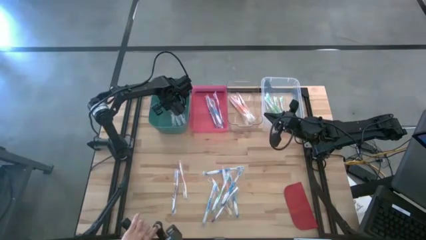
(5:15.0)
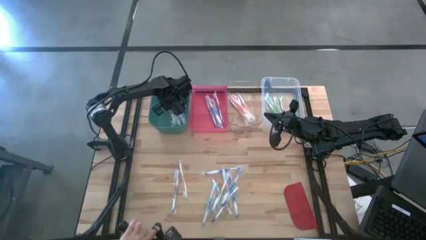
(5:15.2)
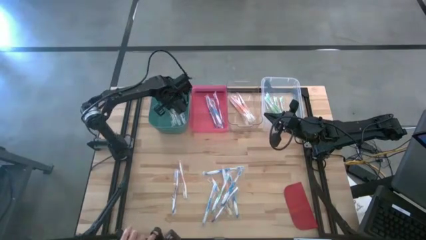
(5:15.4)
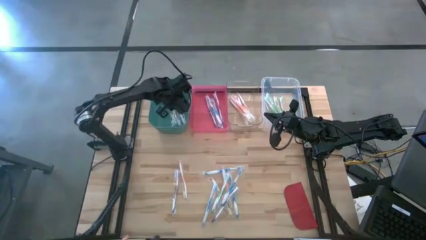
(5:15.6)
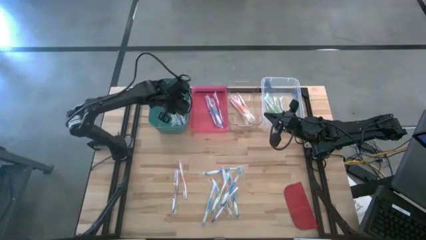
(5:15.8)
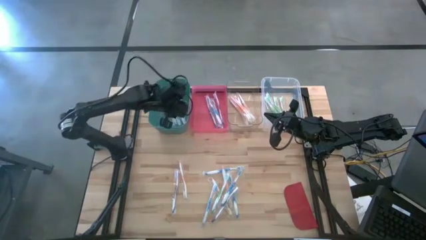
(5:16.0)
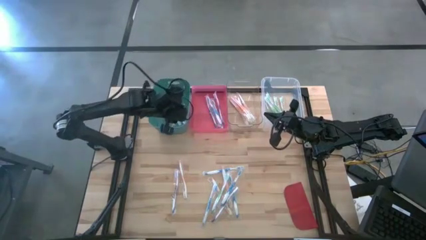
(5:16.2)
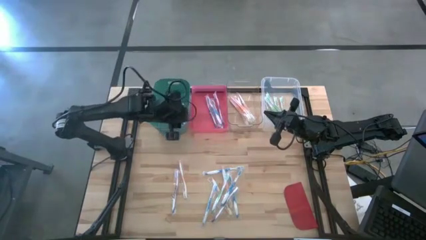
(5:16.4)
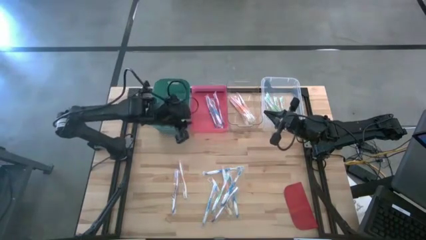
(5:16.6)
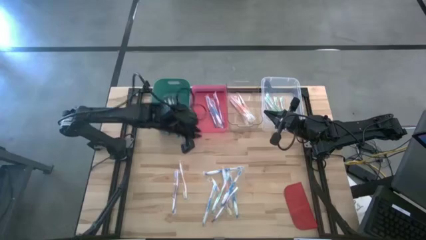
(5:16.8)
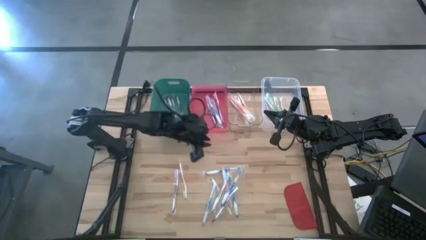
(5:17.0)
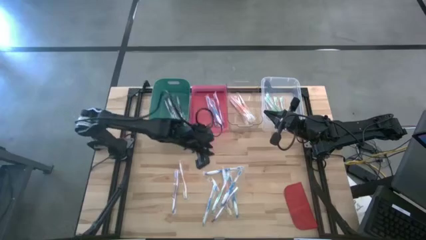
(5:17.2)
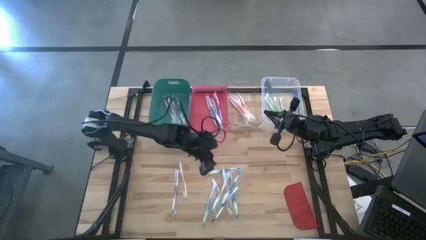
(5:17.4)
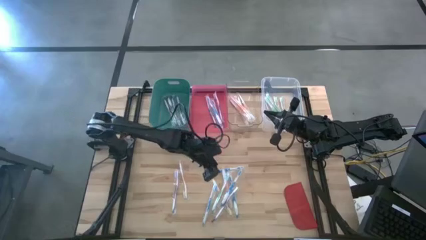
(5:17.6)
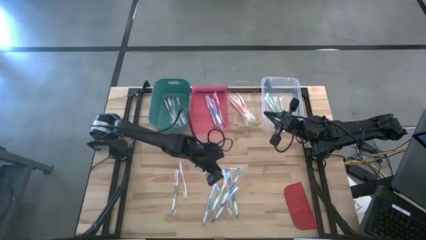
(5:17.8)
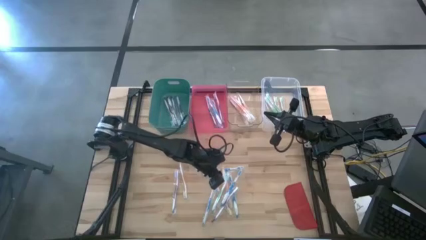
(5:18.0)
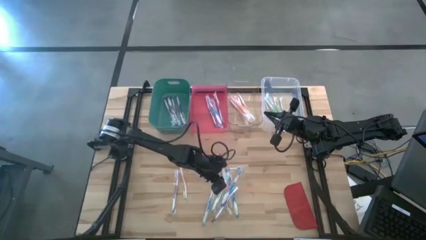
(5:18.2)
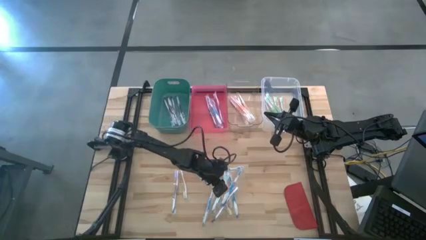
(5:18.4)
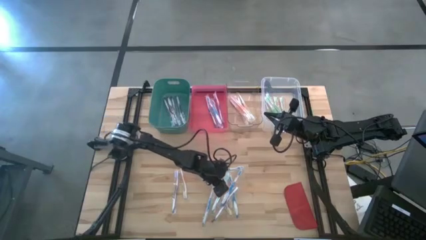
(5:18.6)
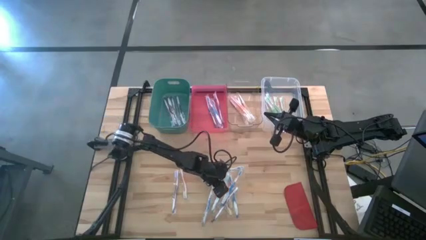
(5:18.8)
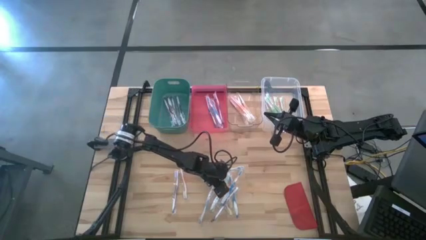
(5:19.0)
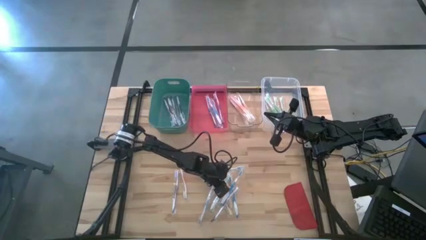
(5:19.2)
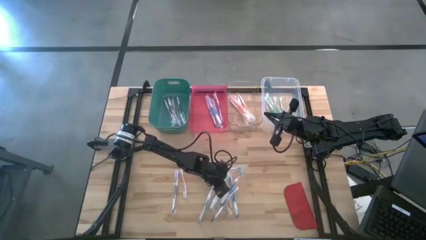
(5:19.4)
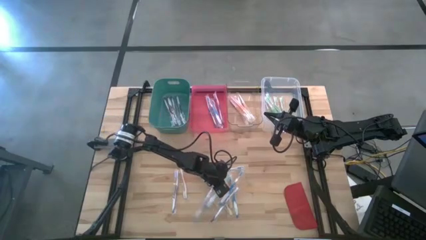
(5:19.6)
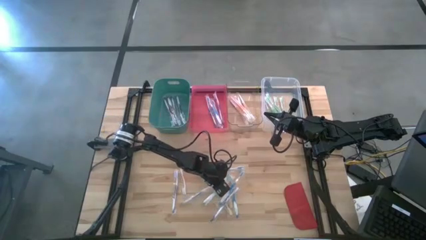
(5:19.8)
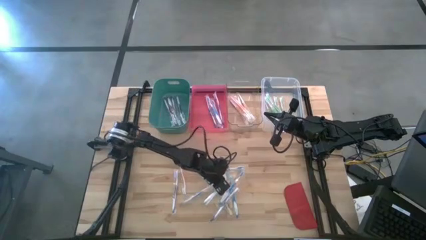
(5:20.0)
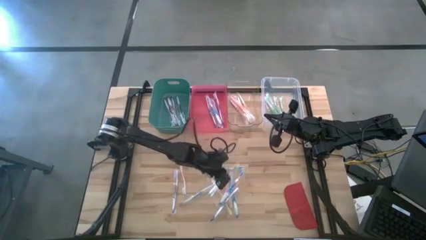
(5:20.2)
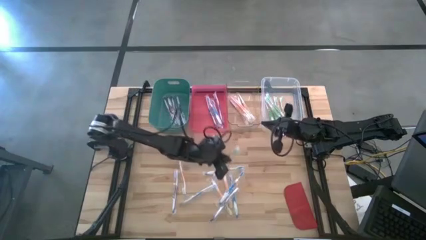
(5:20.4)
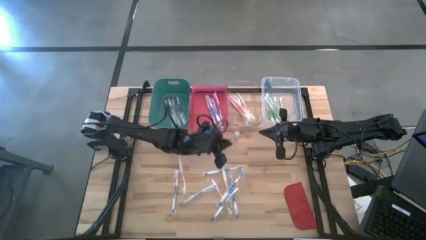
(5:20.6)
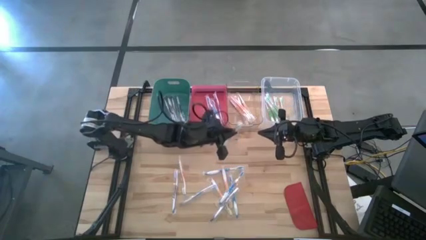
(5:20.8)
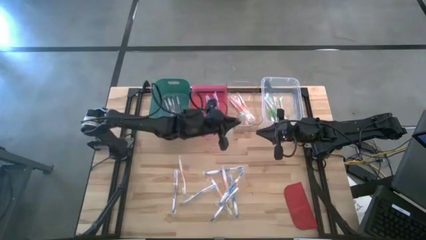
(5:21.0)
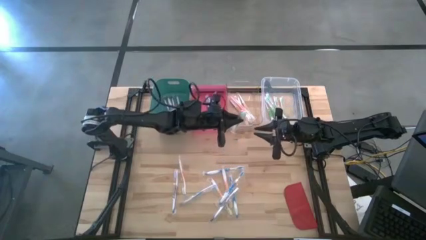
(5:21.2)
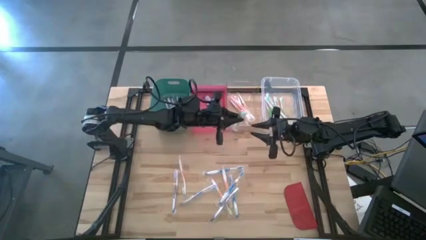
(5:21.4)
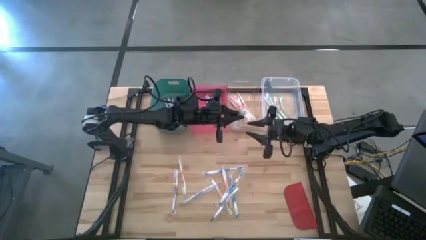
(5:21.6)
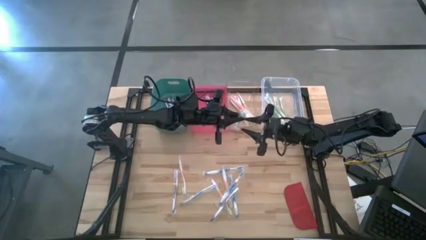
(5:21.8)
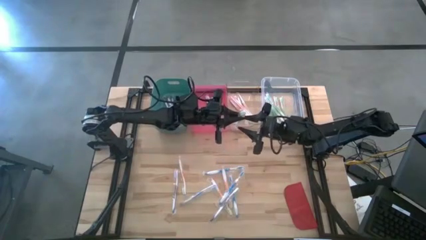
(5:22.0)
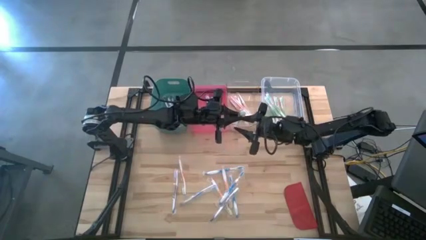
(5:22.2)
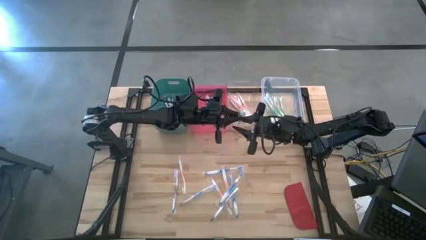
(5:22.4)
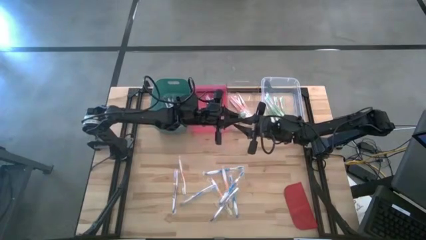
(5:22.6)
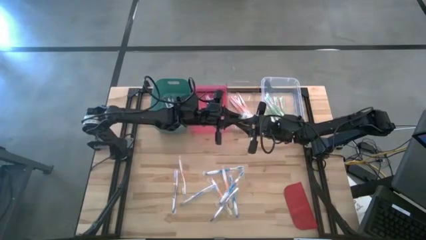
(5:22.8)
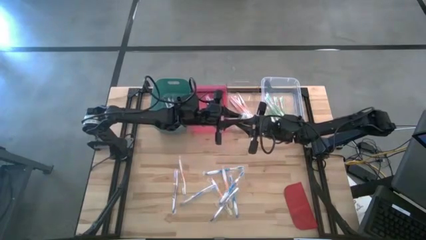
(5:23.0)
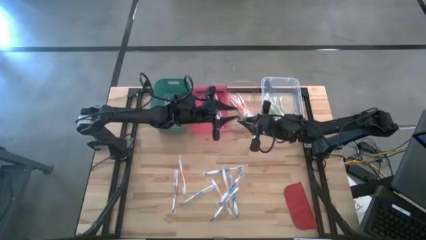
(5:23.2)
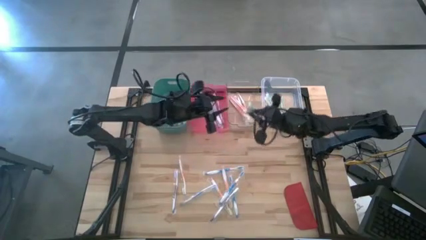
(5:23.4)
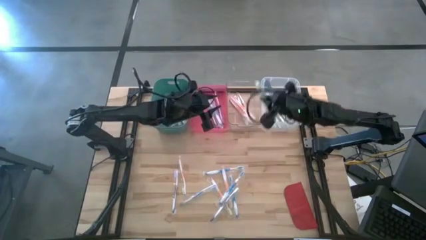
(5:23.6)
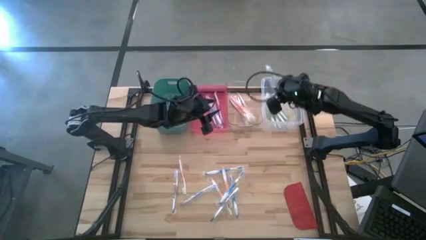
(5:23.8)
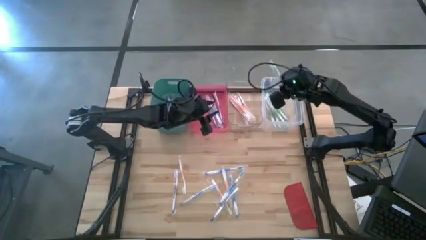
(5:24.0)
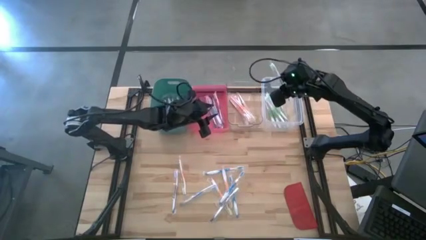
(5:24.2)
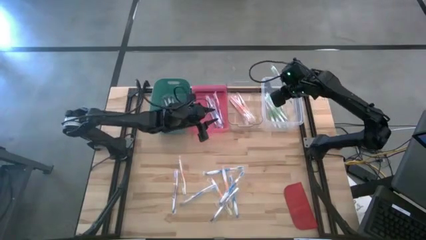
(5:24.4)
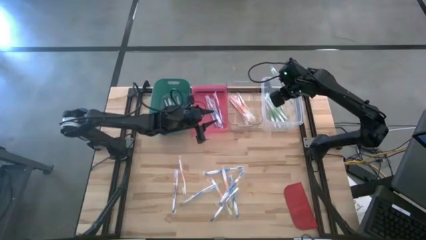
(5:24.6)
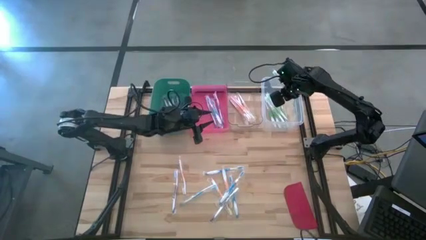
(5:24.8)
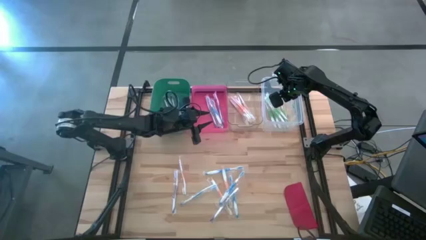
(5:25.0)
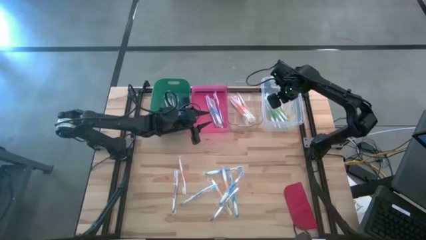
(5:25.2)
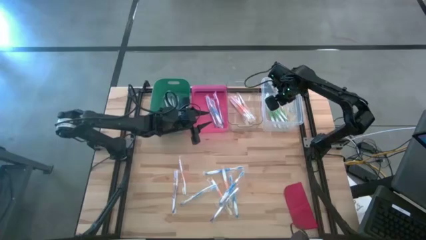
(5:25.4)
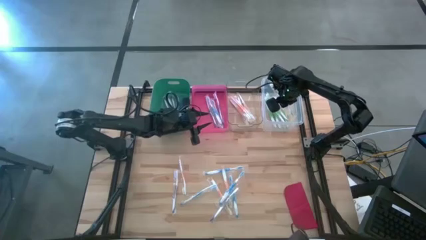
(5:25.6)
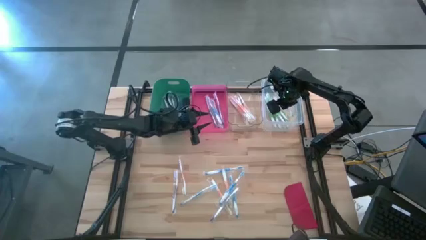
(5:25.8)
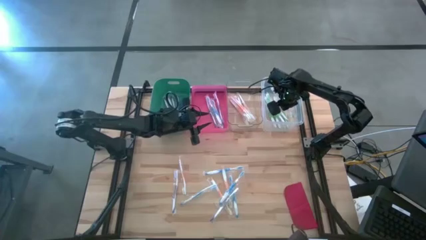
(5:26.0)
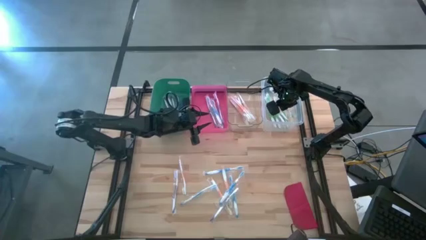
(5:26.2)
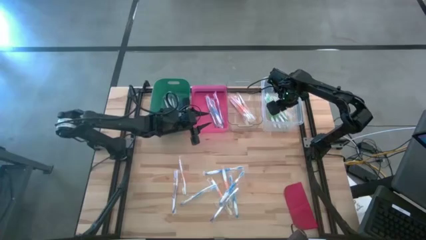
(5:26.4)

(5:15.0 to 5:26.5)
Task: Pick & Place Toothbrushes
Put the green toothbrush into the white bin

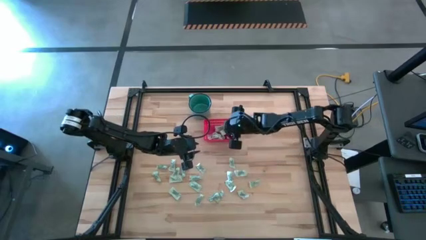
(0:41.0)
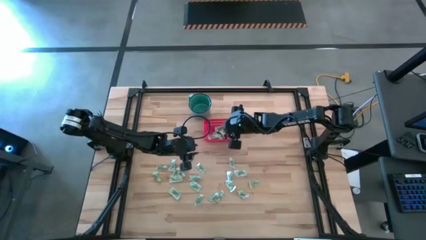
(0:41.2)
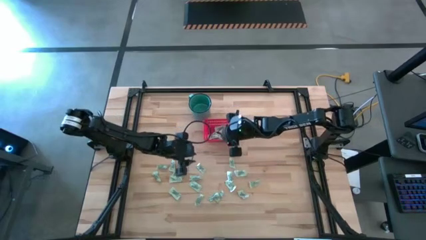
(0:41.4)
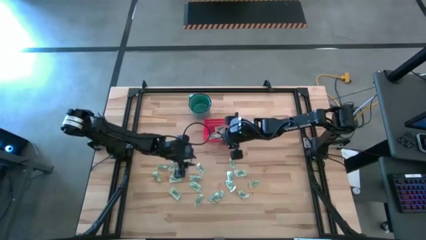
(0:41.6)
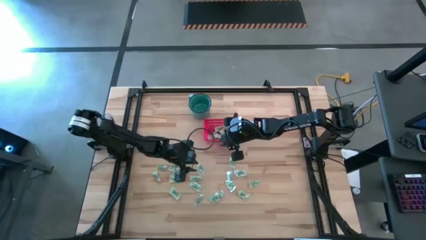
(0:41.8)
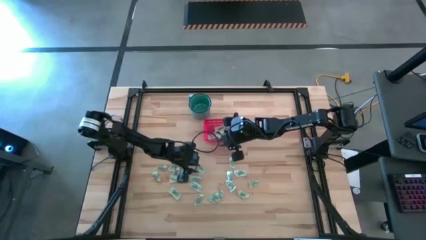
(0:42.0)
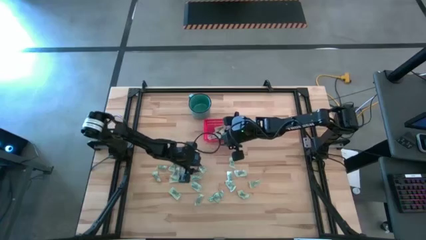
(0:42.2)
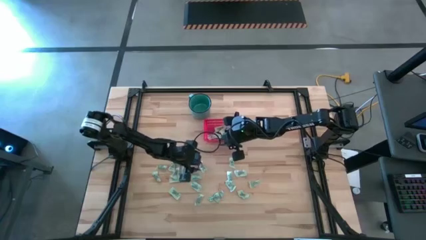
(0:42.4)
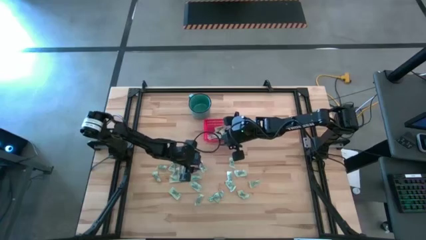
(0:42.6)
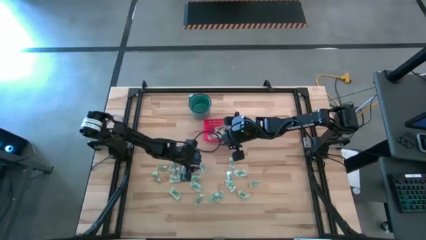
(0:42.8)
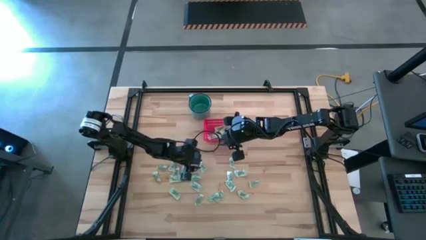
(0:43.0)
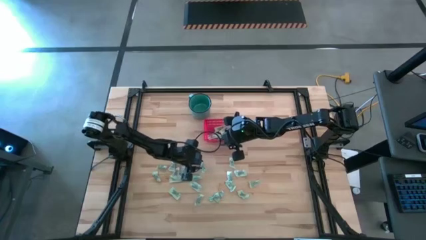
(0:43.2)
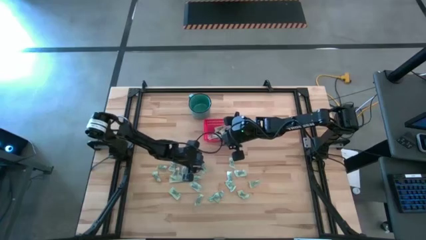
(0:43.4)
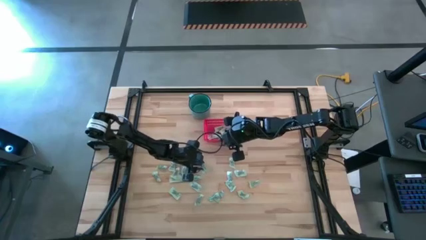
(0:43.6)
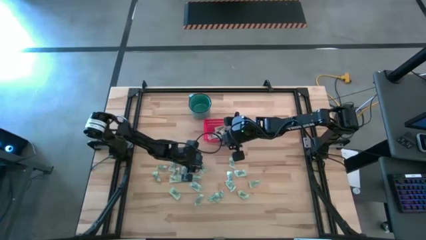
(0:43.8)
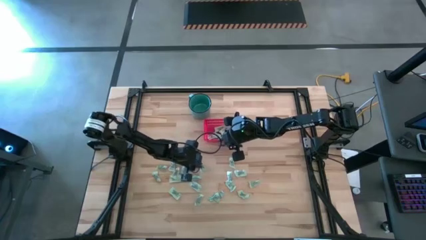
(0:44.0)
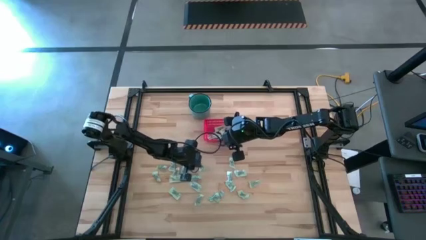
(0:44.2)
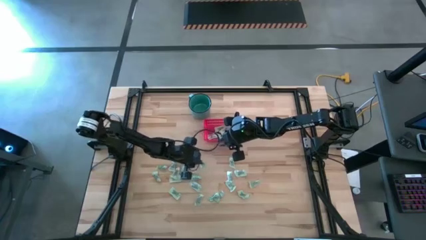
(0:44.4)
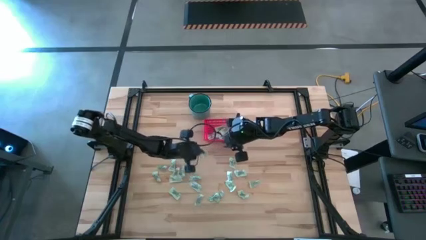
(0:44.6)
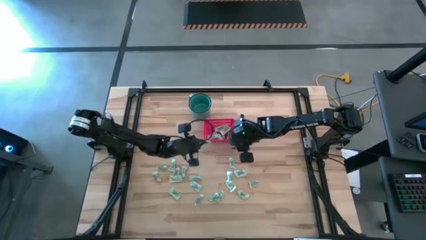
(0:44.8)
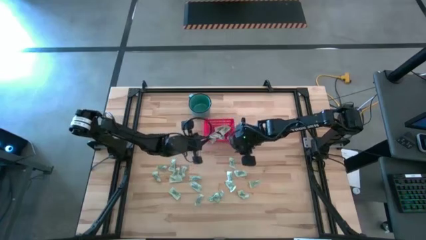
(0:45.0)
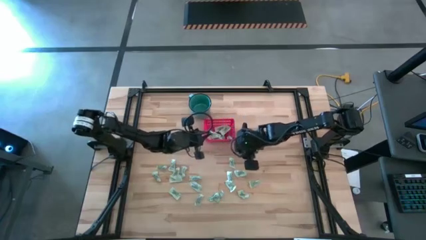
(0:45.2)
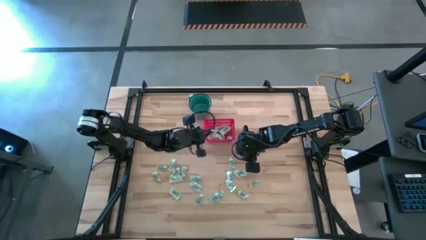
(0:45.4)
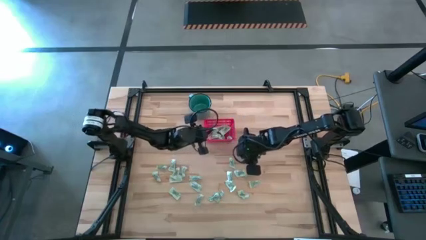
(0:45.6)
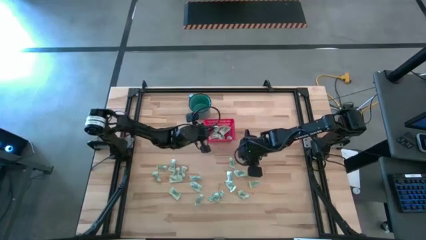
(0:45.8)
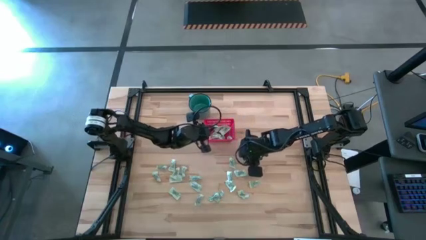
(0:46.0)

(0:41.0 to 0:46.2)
Task: Pick and place items into bin
Put the light green stevia packet into the red bin
